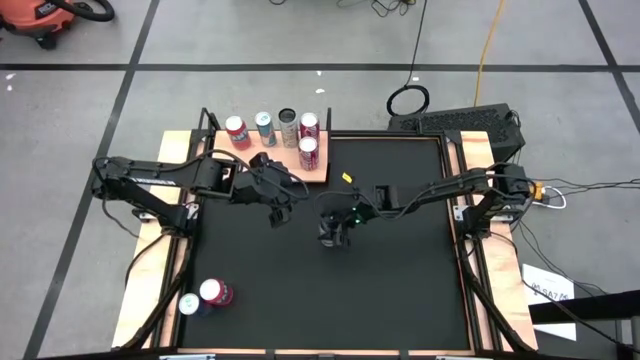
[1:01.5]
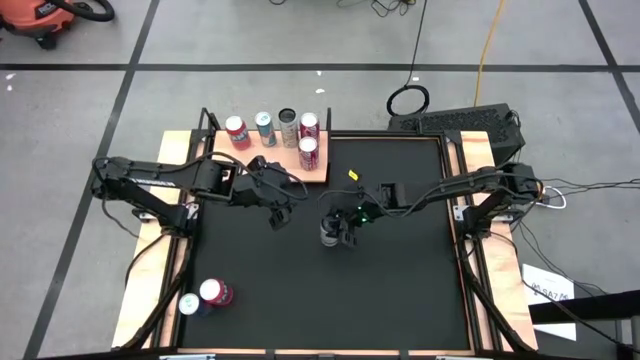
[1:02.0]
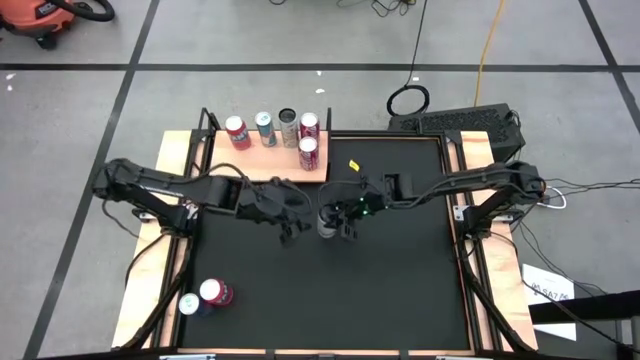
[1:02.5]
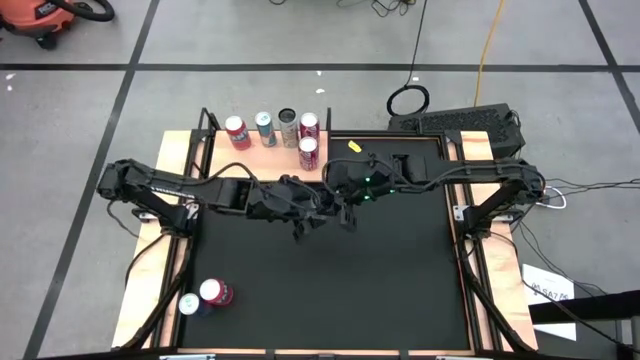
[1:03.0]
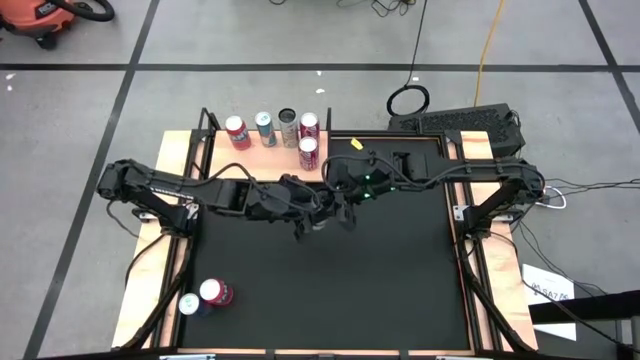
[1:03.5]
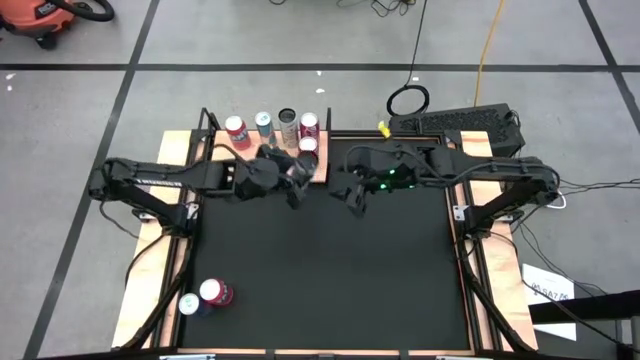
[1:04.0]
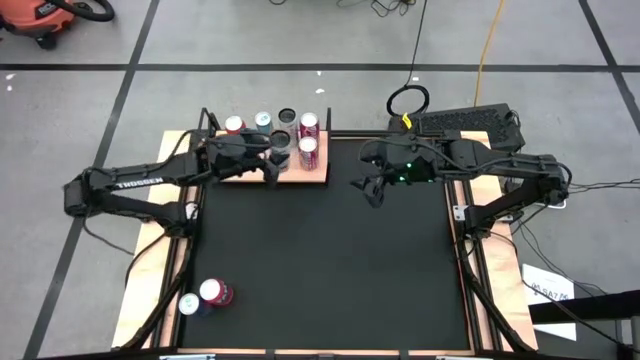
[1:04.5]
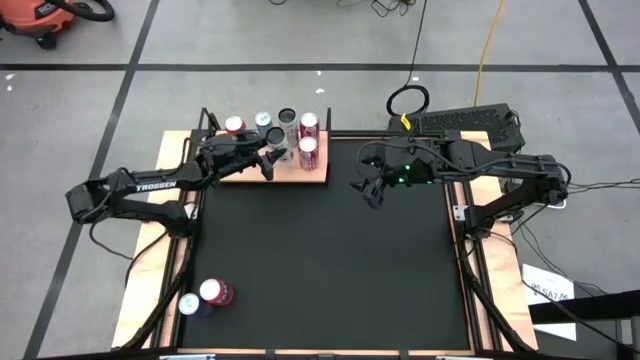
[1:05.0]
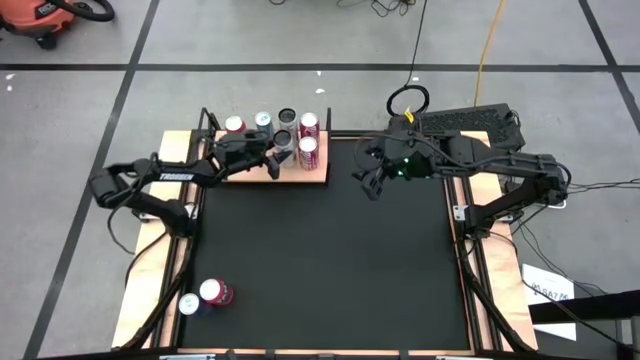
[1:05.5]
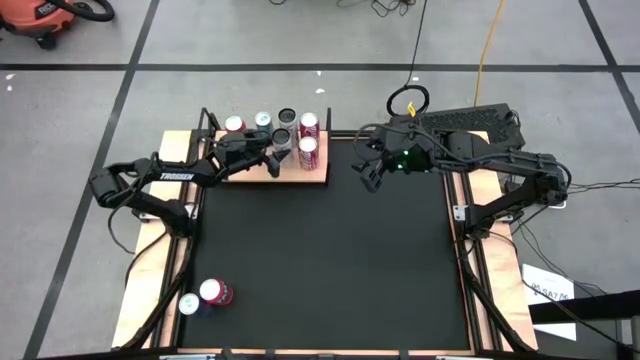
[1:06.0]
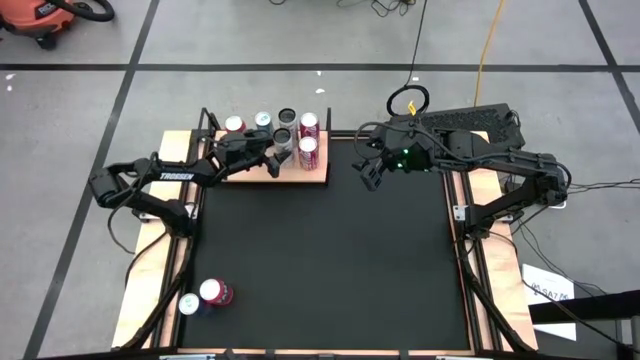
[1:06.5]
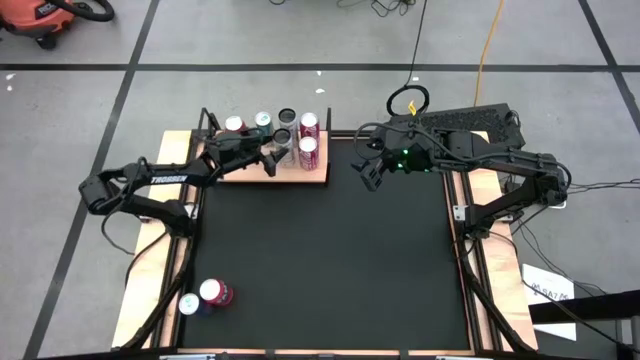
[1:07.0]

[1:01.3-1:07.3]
Task: Place canned beverage on shelf
Put the white yellow soda can on the shelf aligned with the other white yellow soda can

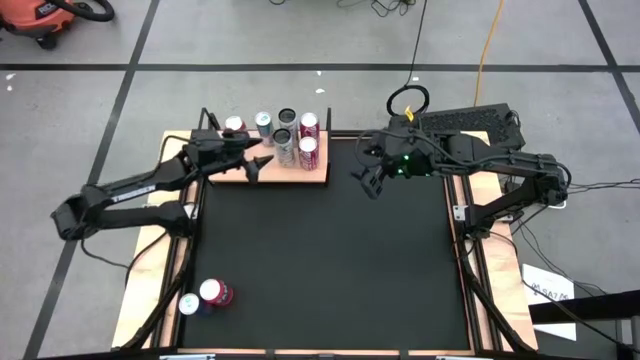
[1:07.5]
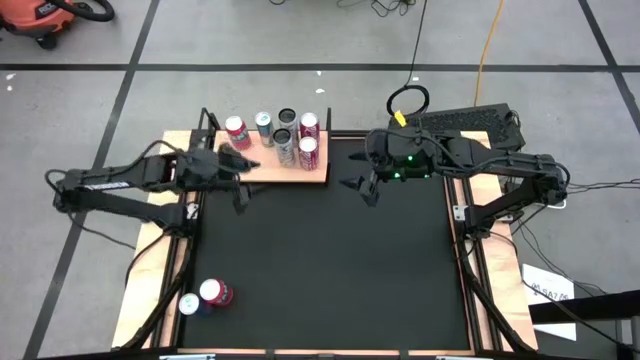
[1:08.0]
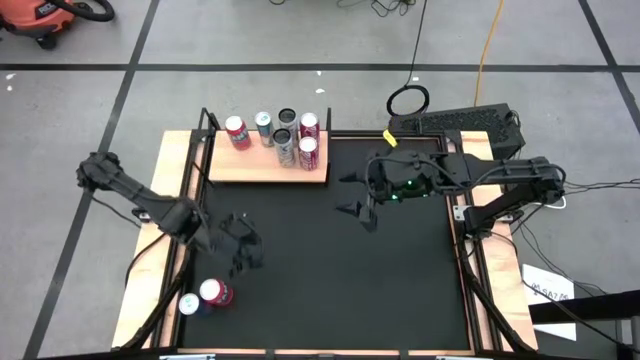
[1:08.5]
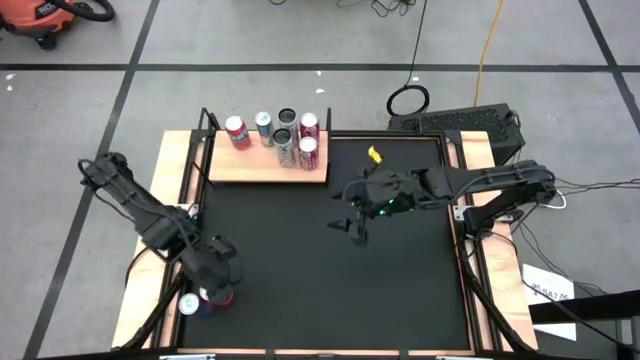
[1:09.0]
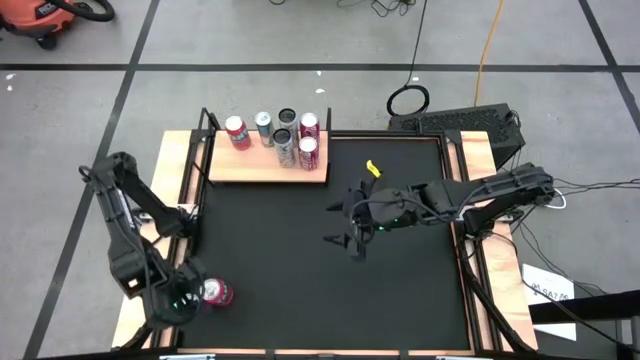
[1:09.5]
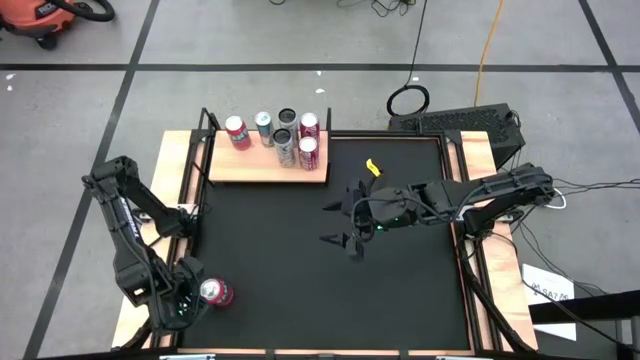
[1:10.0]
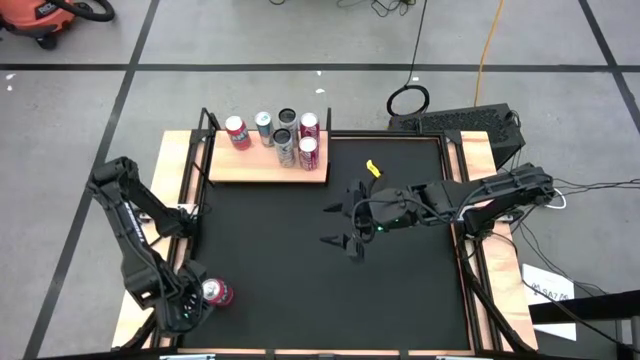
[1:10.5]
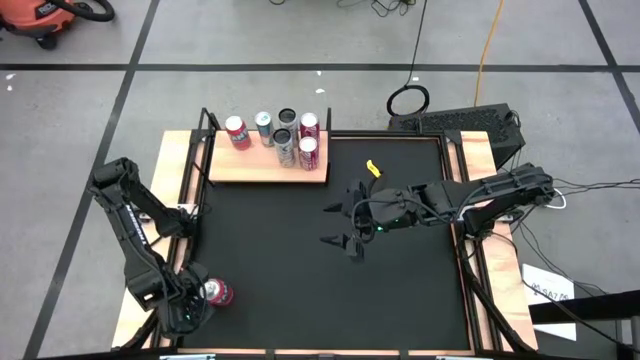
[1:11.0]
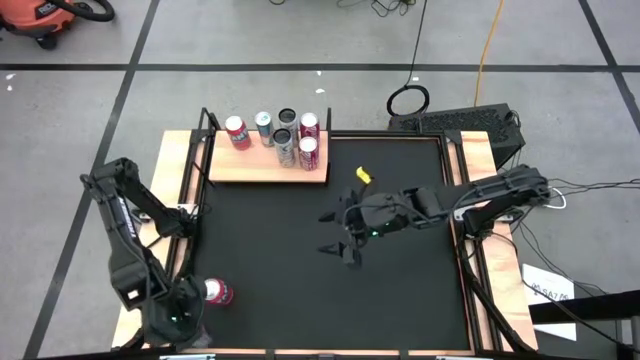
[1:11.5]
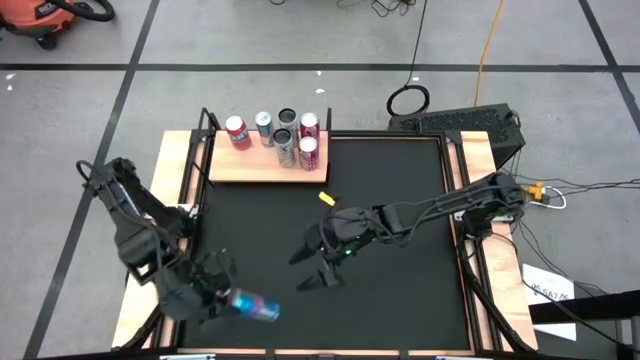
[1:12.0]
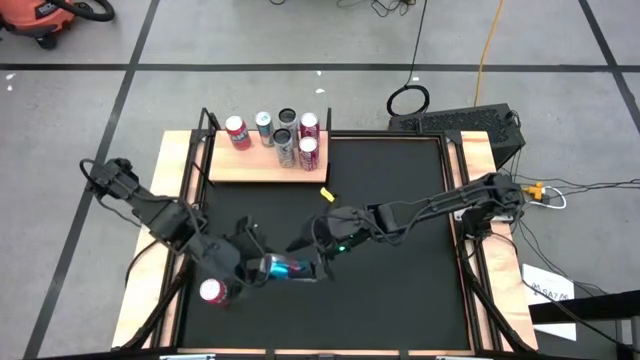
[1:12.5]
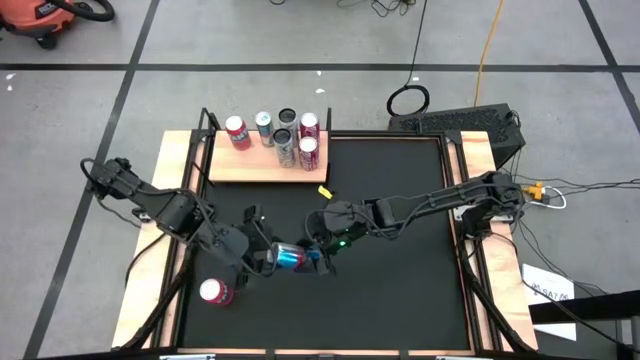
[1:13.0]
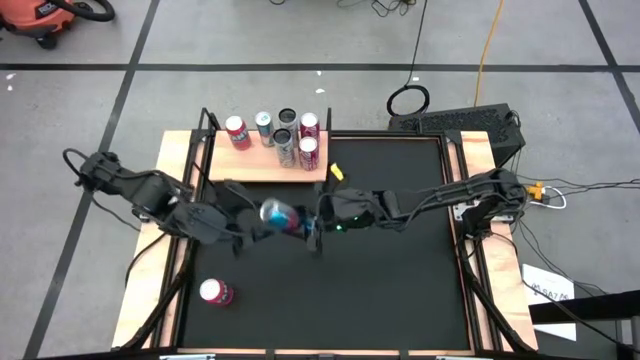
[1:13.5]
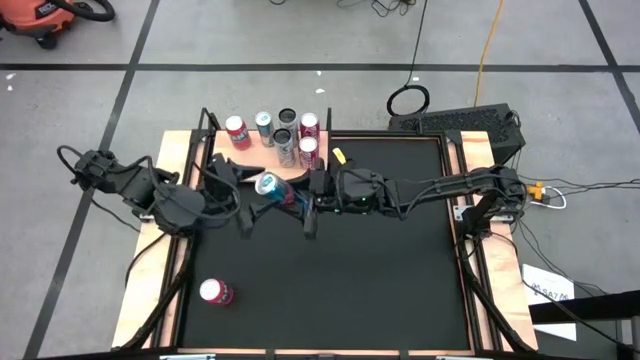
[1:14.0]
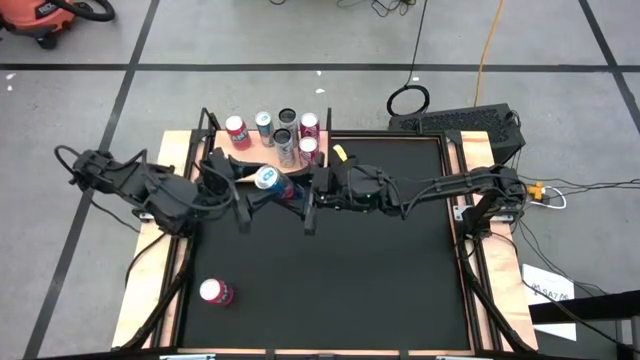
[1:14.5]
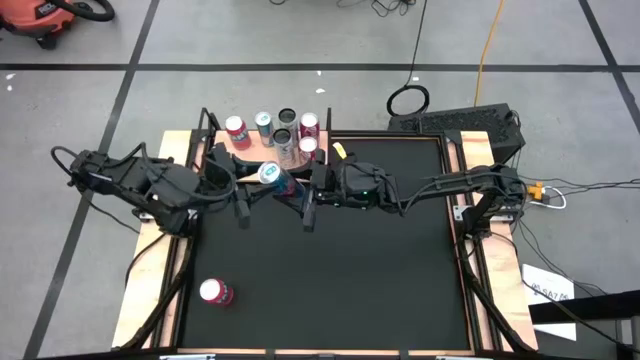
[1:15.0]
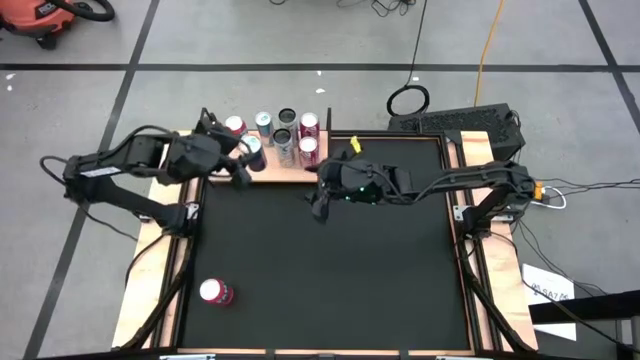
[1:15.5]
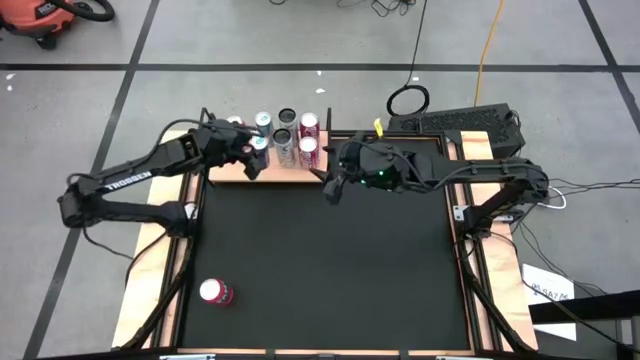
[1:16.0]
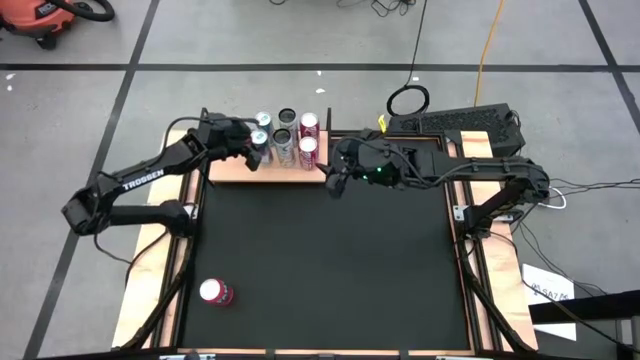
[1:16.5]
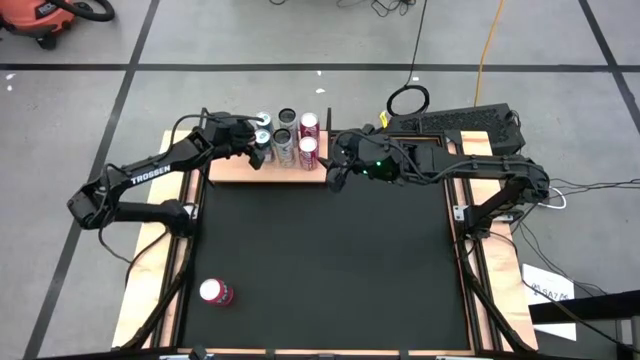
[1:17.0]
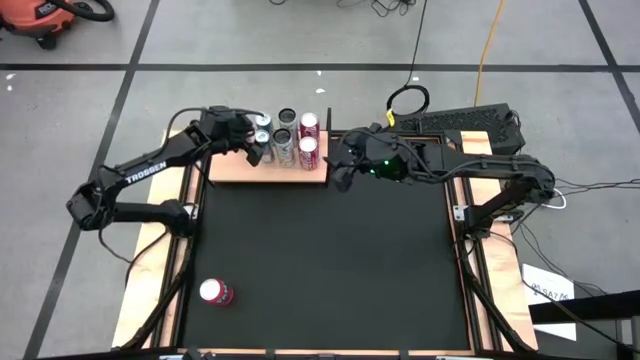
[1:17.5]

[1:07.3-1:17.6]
Put the blue soda can on the shelf aligned with the other blue soda can

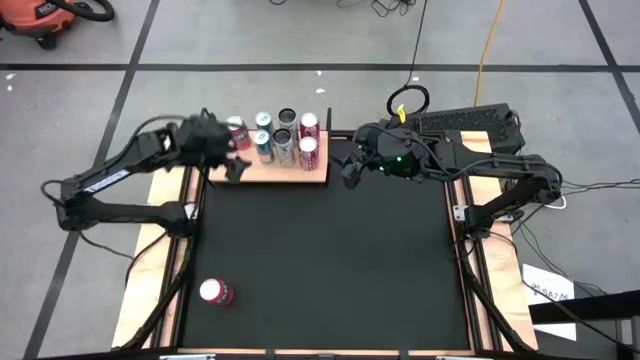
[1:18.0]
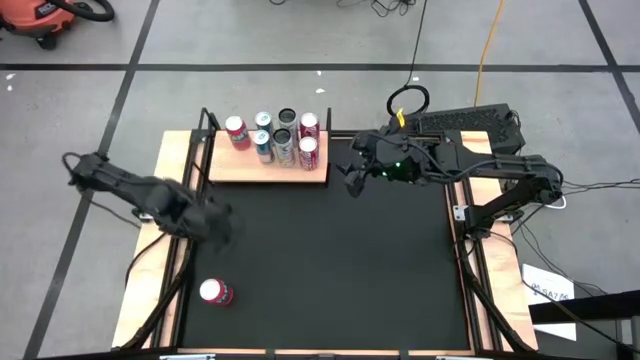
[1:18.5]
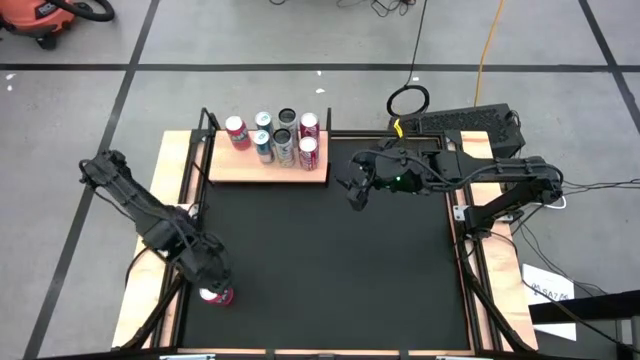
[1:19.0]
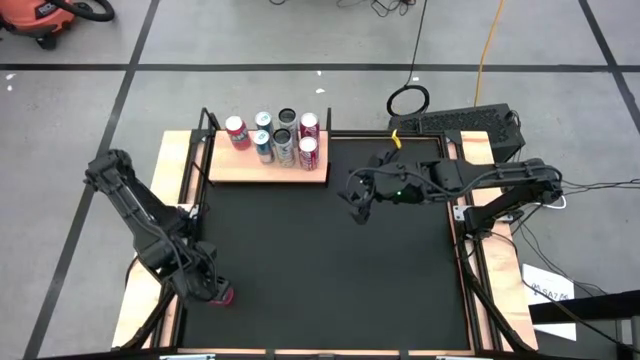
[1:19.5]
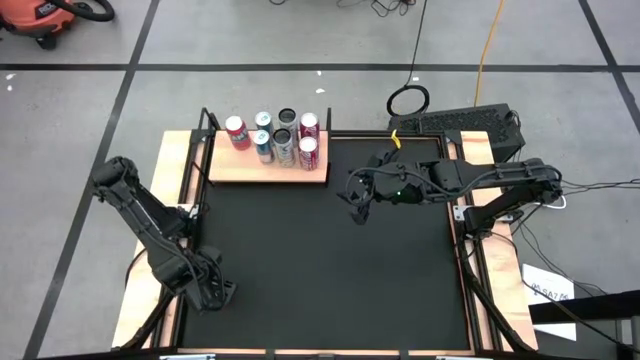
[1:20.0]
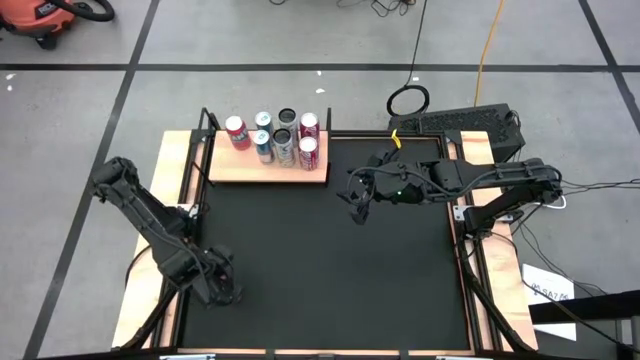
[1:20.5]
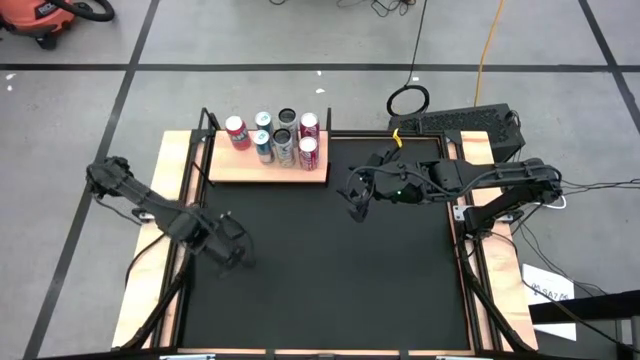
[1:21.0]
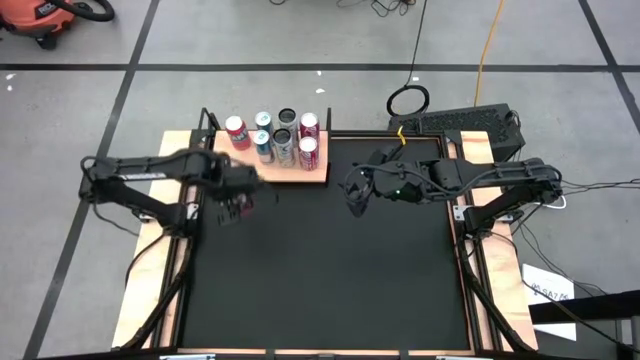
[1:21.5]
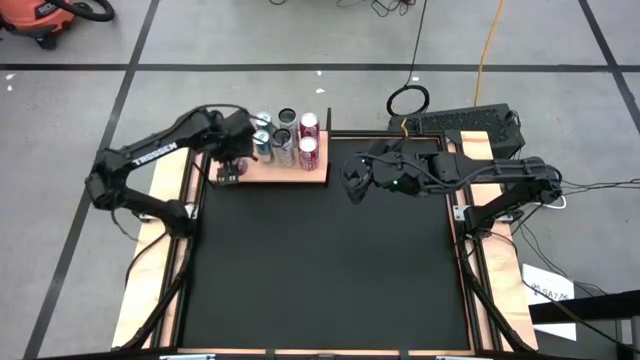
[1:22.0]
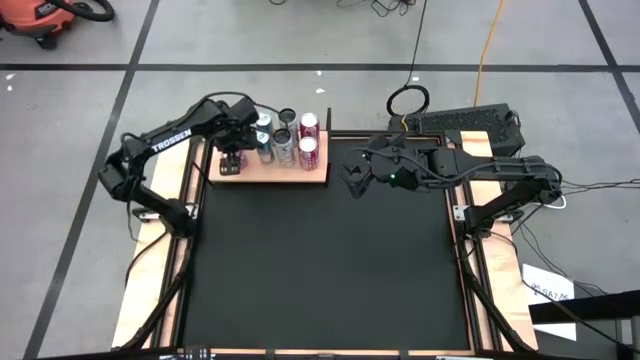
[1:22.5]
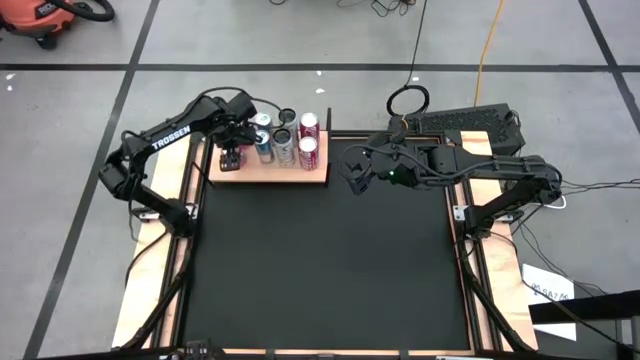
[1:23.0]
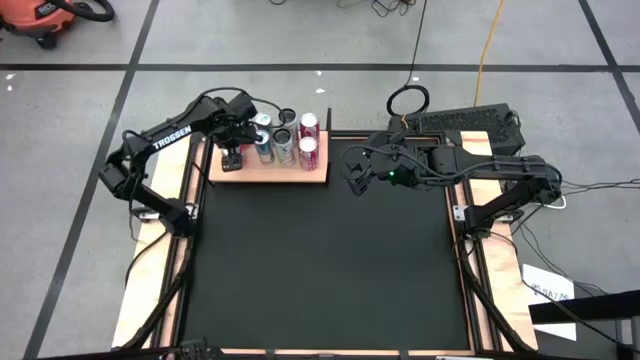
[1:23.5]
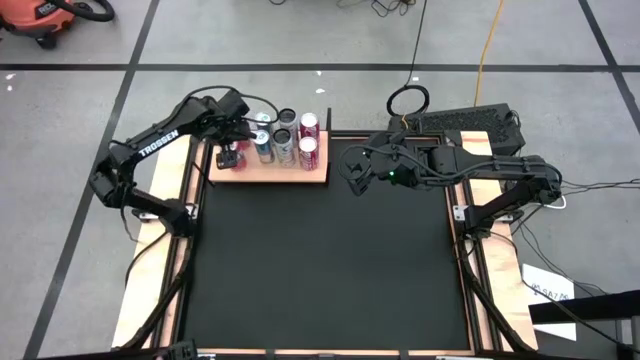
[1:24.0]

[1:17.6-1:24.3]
Put the red soda can on the shelf aligned with the other red soda can
